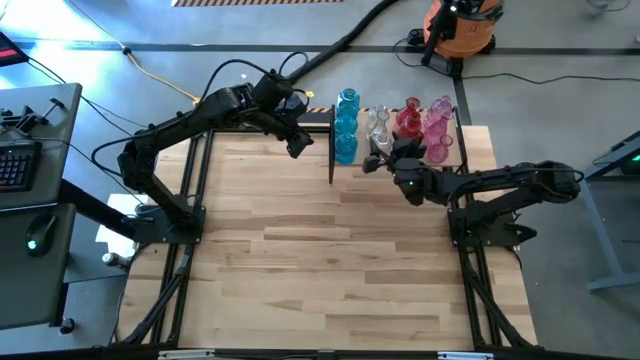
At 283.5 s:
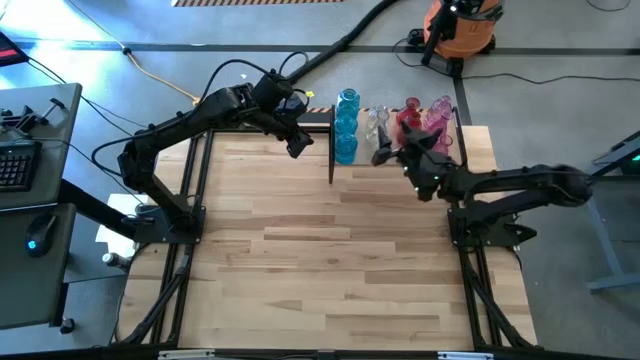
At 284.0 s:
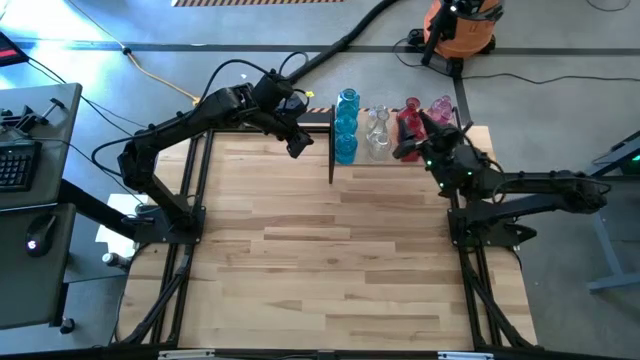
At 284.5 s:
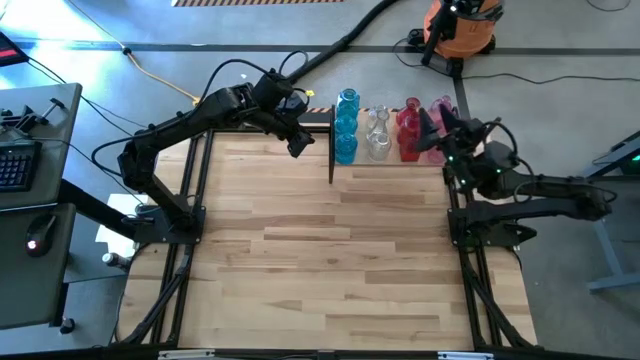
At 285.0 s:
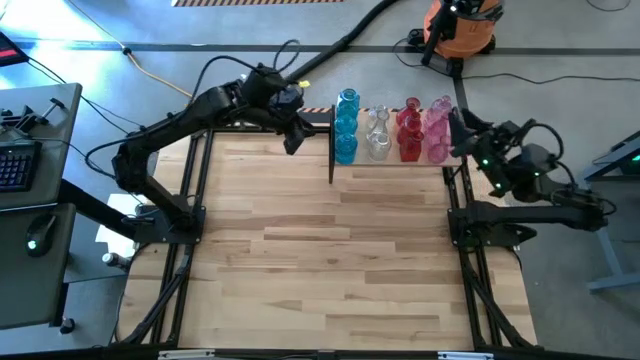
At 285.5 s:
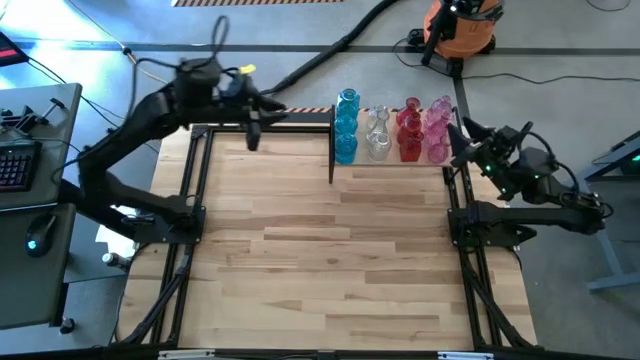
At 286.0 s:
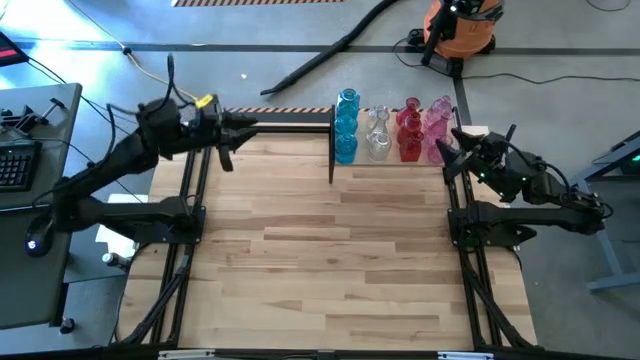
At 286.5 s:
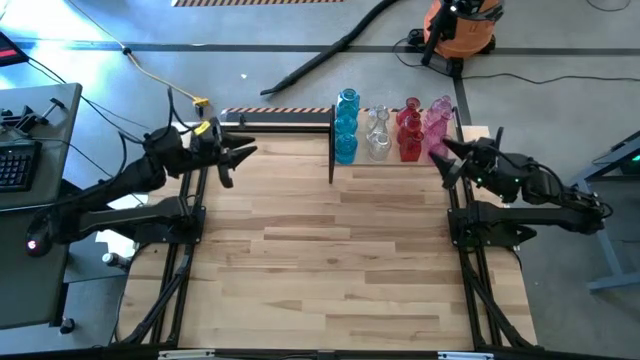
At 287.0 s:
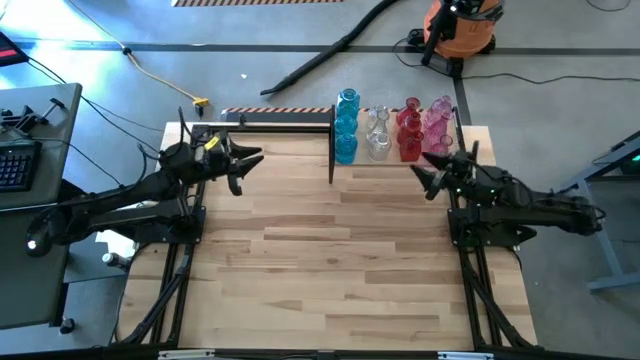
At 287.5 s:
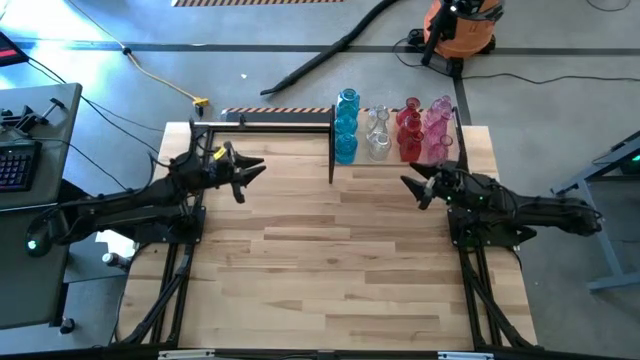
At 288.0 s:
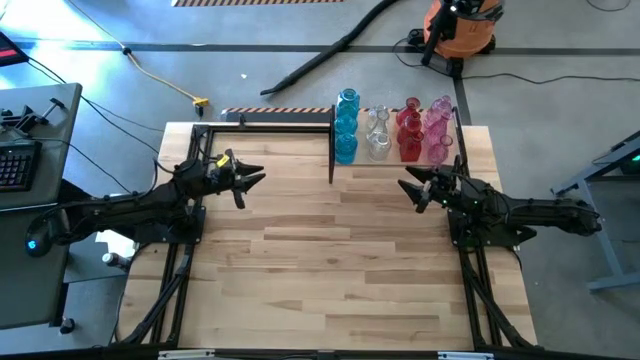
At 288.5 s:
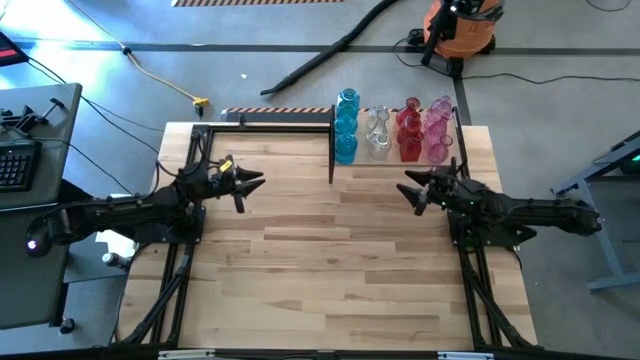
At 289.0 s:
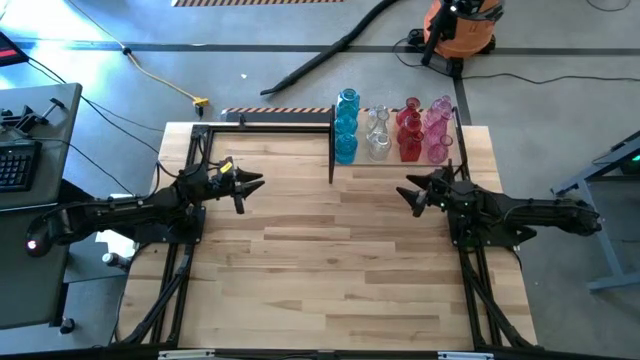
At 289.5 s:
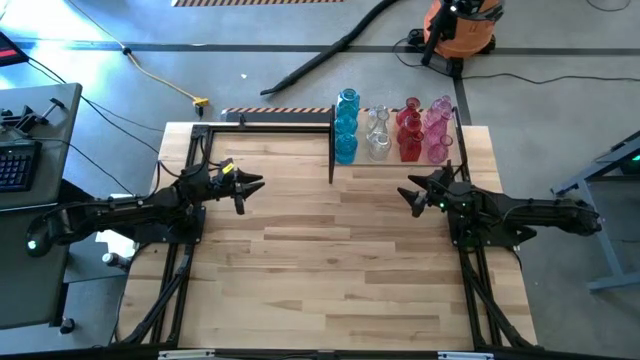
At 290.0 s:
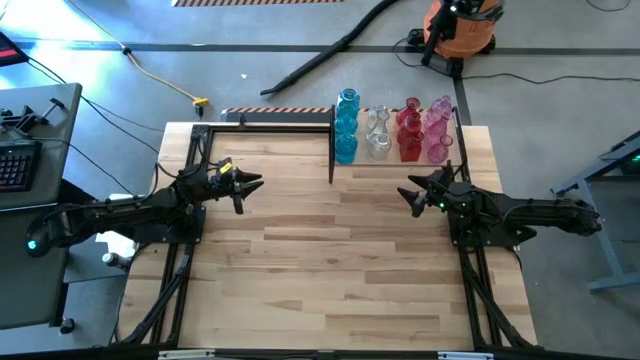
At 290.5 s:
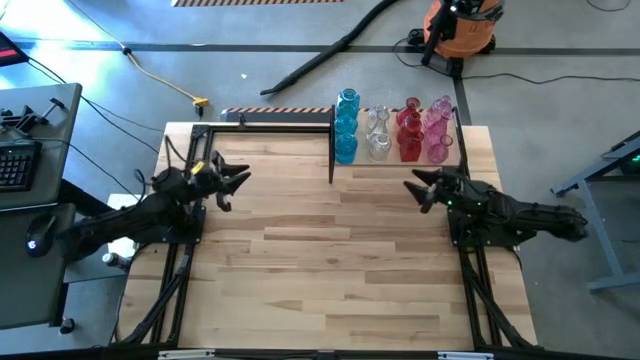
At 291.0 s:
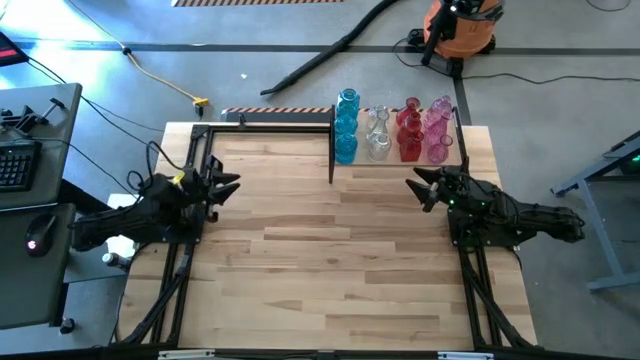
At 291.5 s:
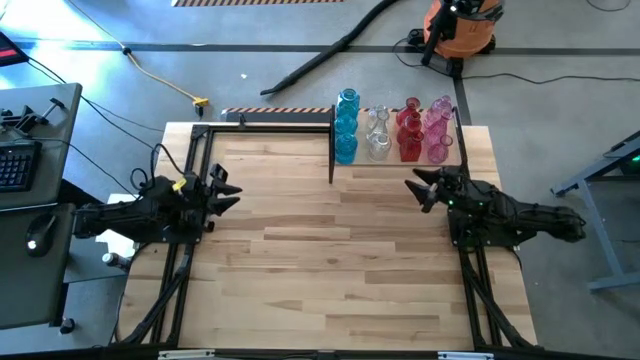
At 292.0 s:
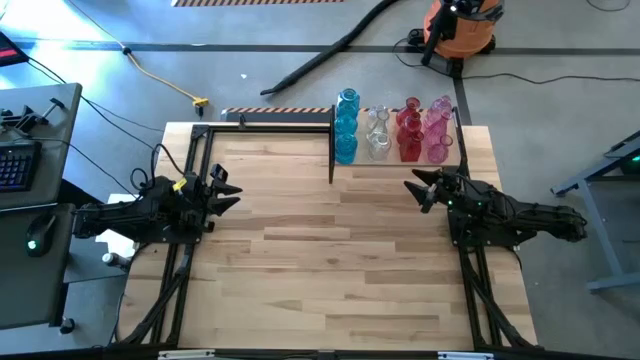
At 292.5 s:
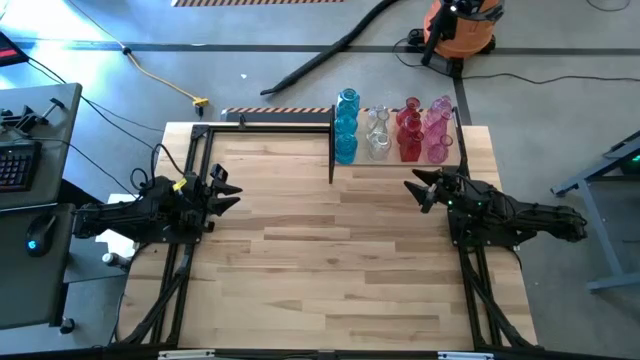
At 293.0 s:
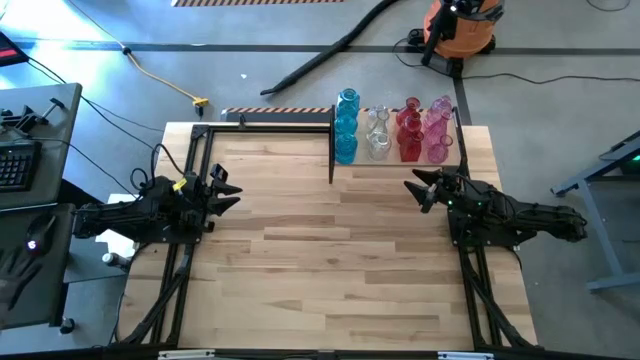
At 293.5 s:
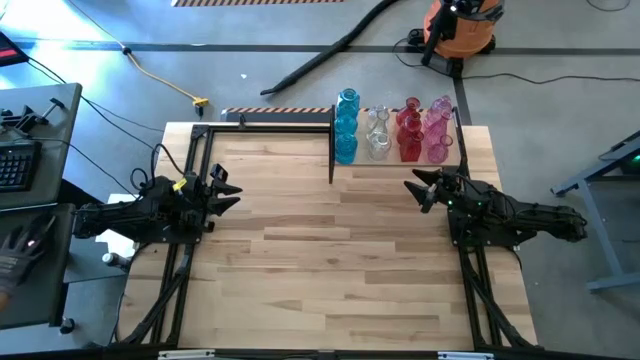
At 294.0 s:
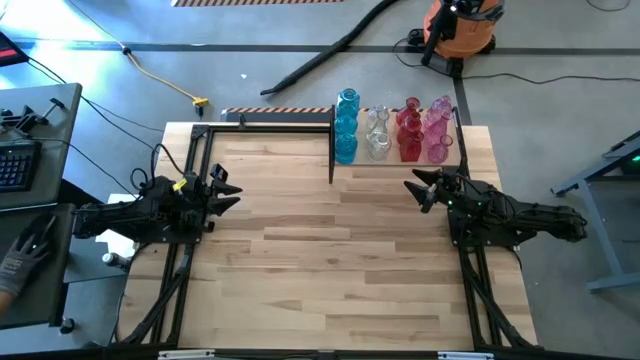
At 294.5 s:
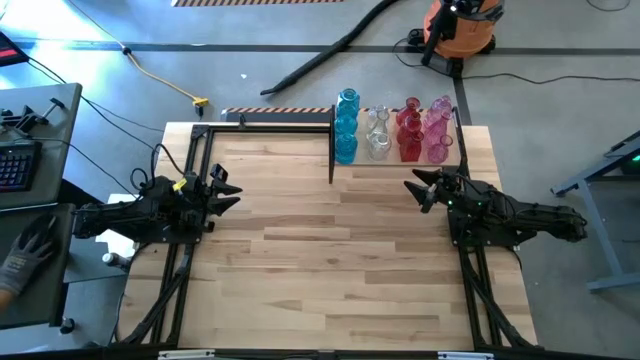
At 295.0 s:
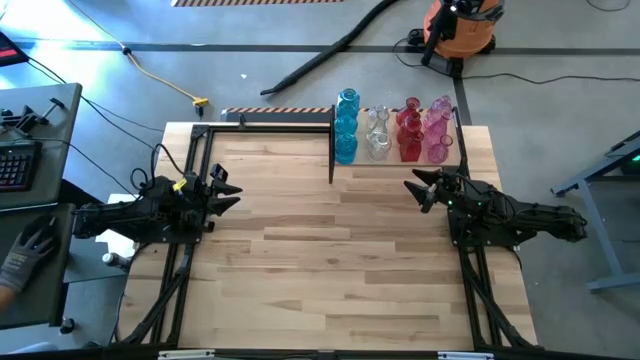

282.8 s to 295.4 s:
Task: sort vases onto shelf
Return to Home Position

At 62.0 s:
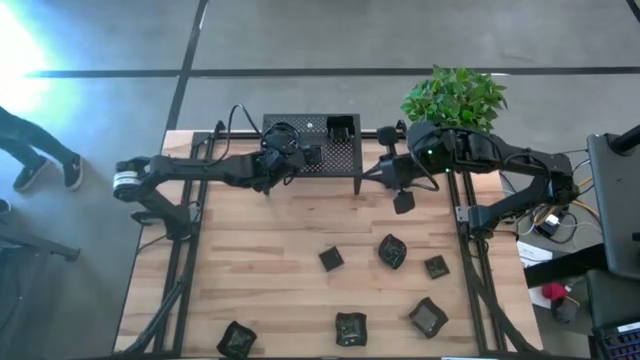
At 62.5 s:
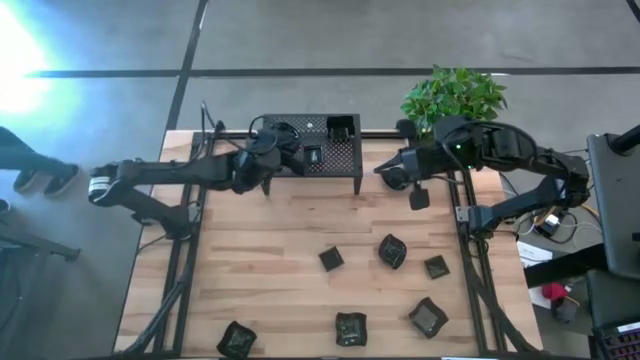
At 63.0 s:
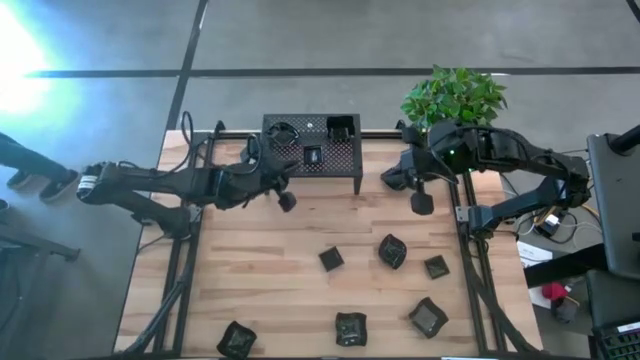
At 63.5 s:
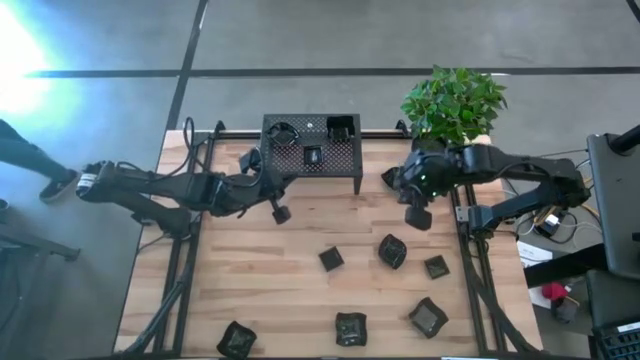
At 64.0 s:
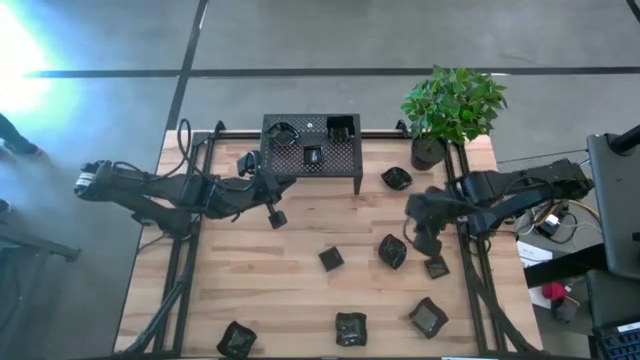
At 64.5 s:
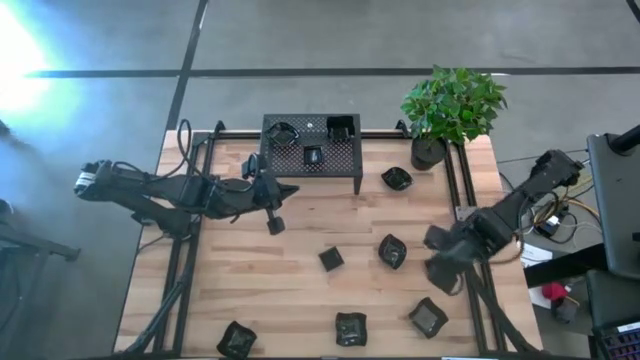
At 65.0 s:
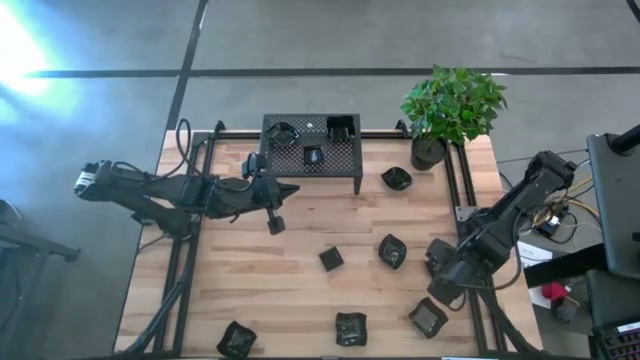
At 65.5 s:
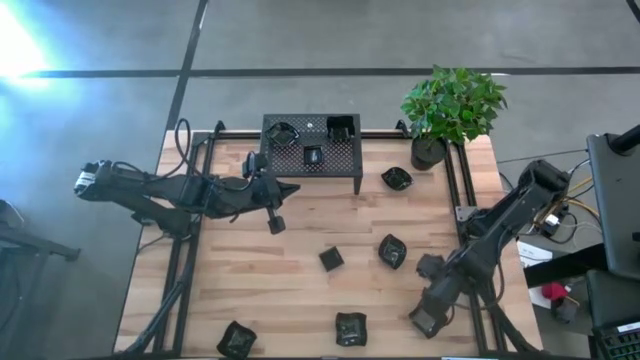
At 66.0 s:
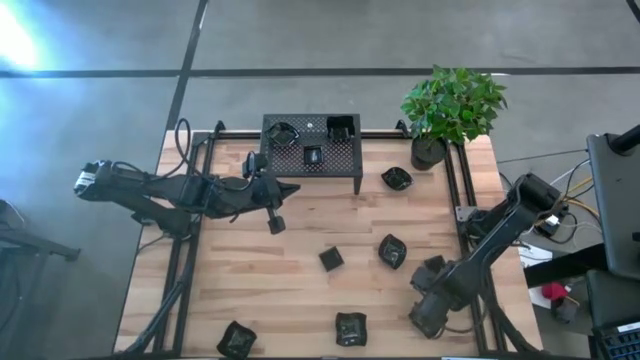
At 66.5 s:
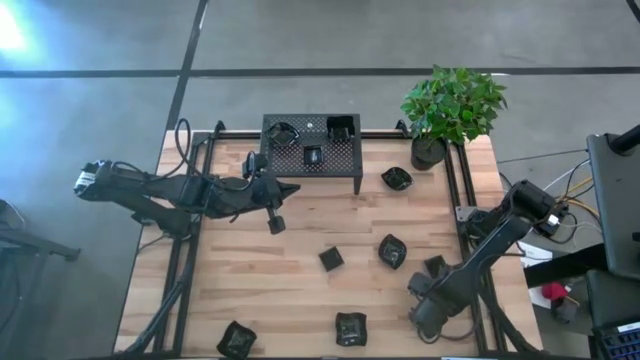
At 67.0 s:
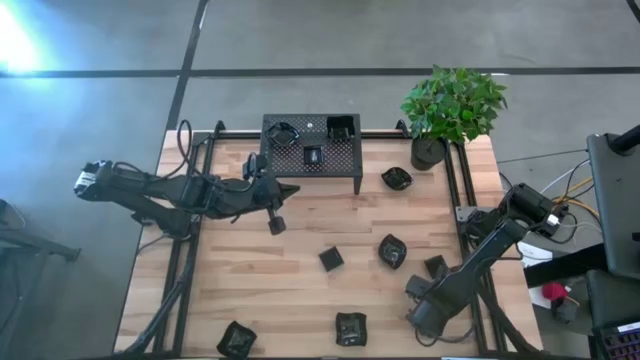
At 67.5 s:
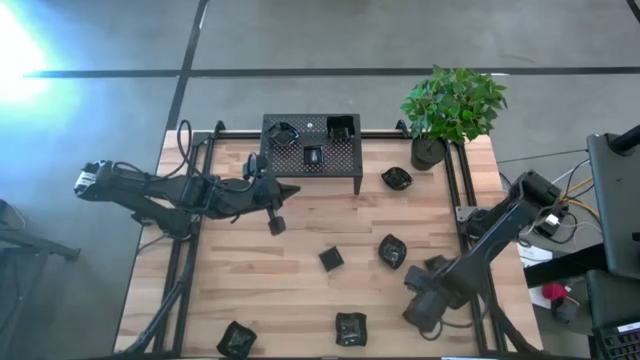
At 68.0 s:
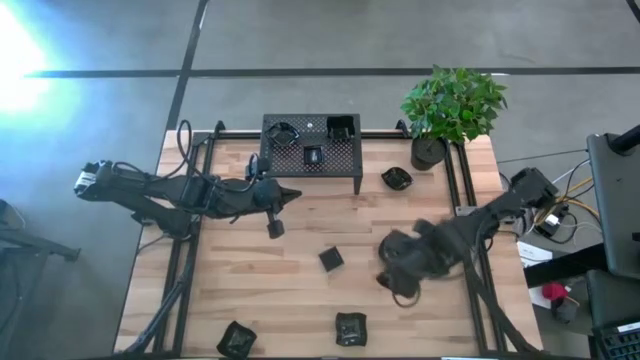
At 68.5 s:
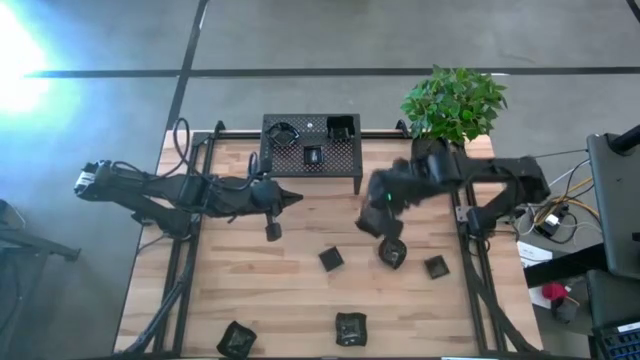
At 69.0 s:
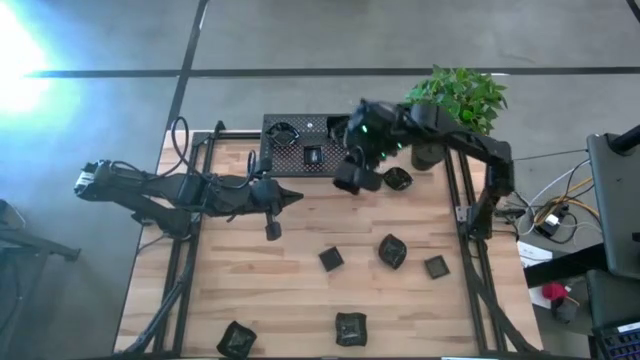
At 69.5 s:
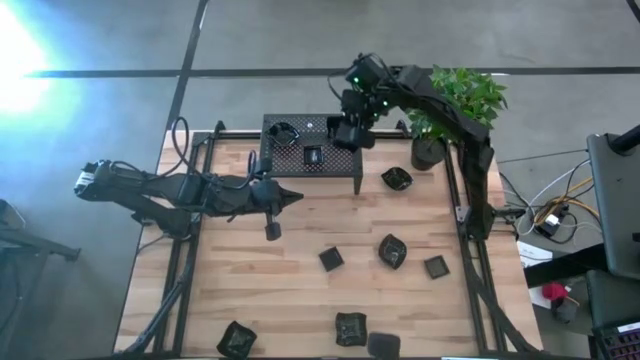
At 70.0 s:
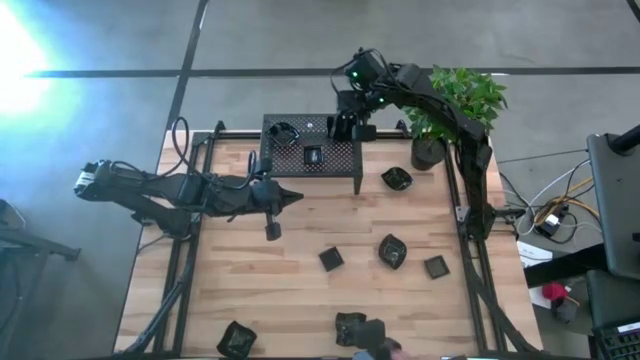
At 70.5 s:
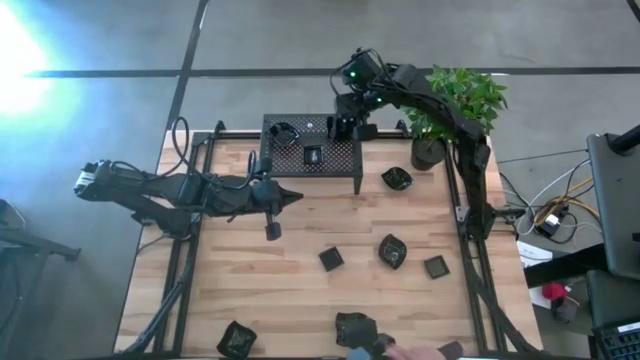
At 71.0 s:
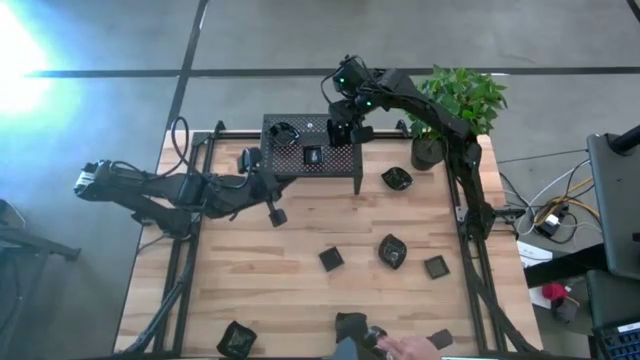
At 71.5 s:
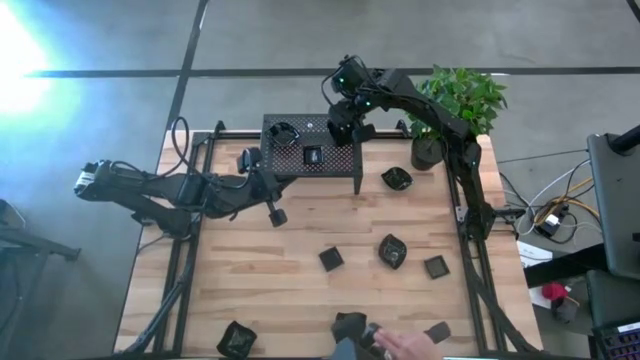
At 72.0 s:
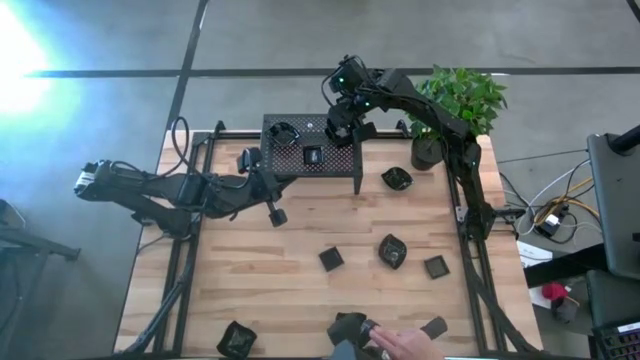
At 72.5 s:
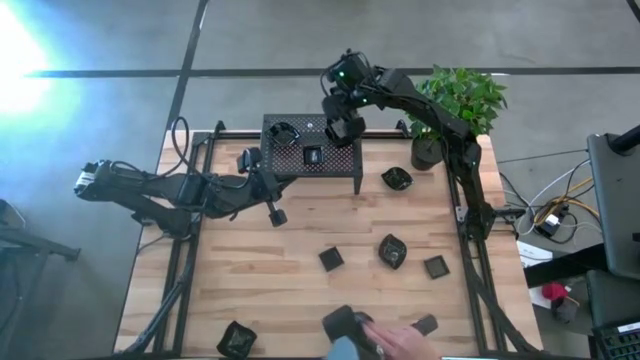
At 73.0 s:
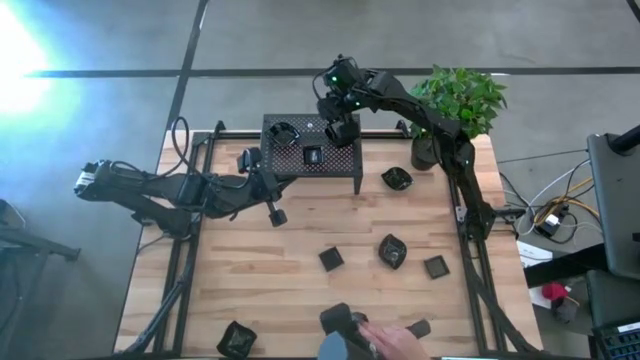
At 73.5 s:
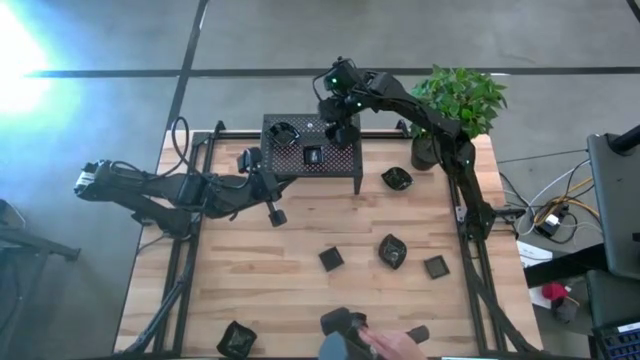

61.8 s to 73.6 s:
Task: Pick & Place Mini shaped plates
Put the distorted square plate on top of the distorted square plate on the shelf
